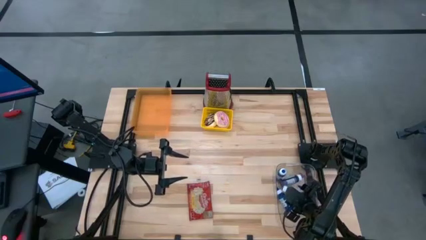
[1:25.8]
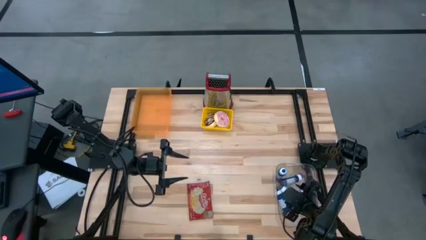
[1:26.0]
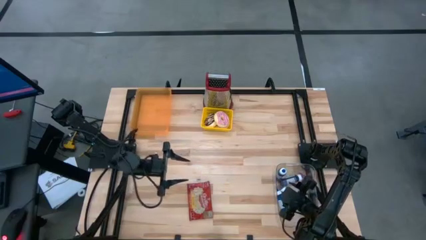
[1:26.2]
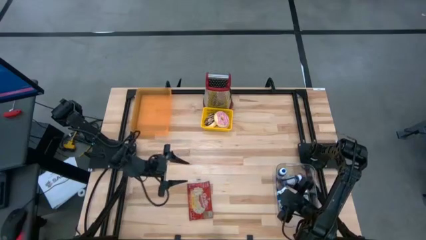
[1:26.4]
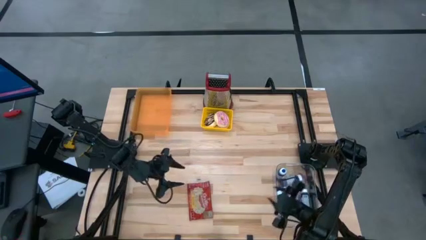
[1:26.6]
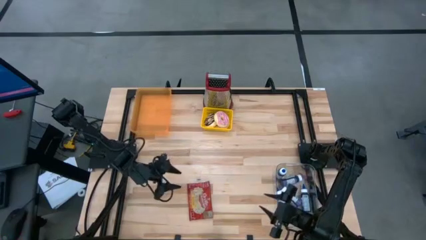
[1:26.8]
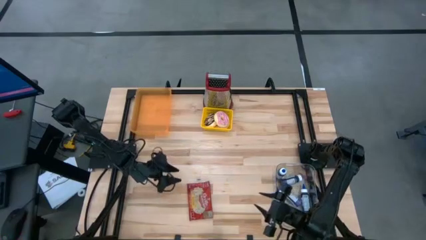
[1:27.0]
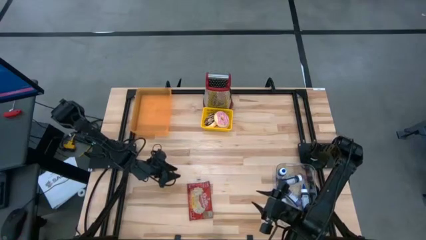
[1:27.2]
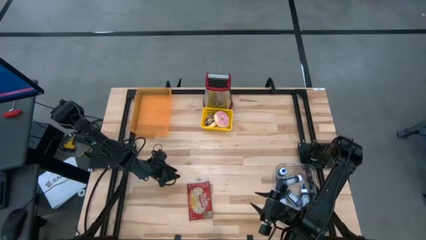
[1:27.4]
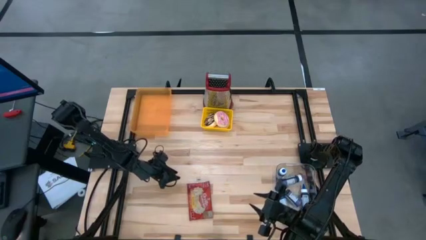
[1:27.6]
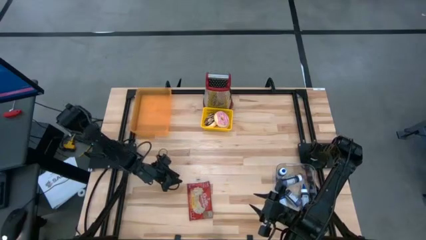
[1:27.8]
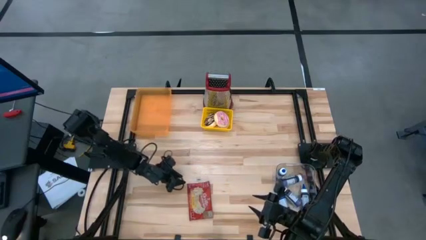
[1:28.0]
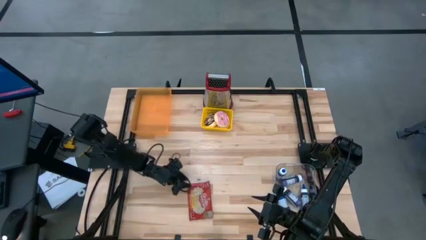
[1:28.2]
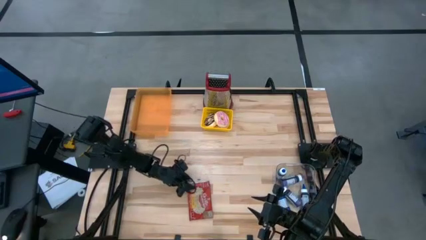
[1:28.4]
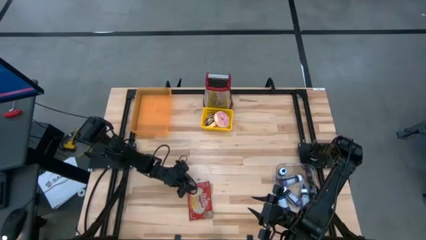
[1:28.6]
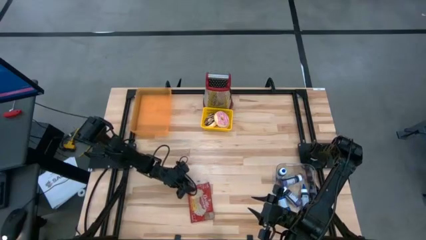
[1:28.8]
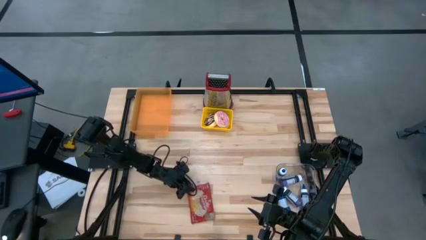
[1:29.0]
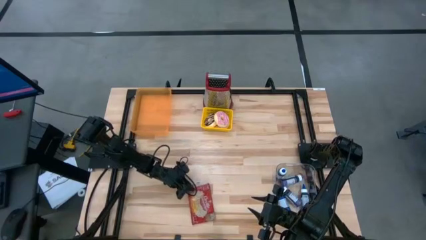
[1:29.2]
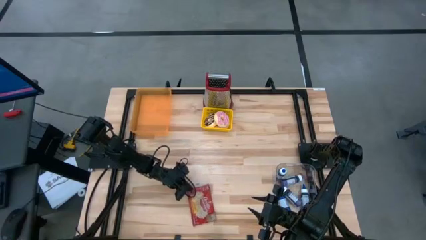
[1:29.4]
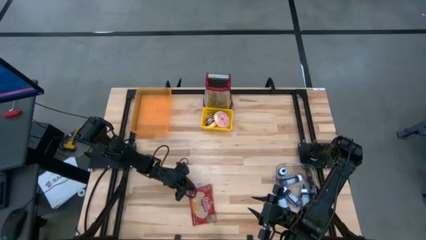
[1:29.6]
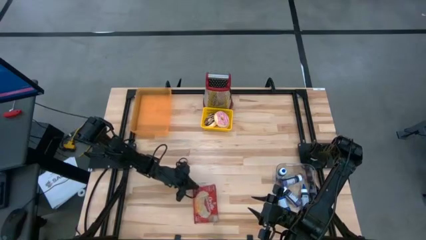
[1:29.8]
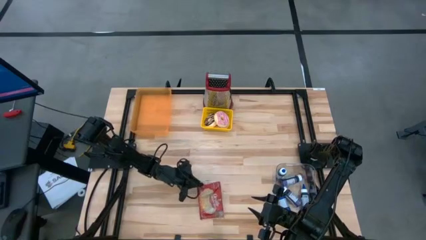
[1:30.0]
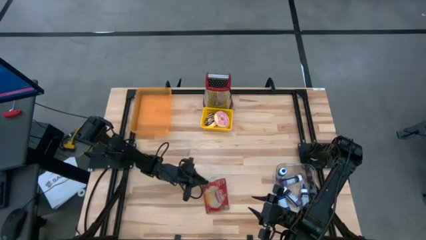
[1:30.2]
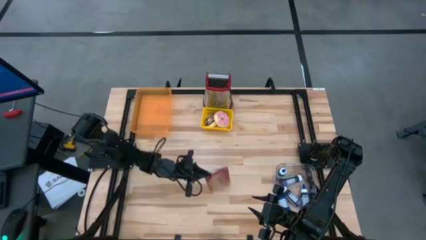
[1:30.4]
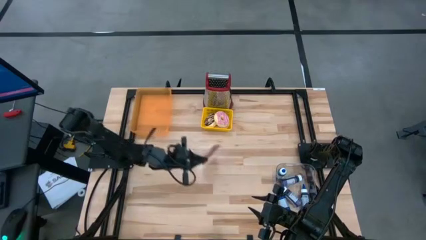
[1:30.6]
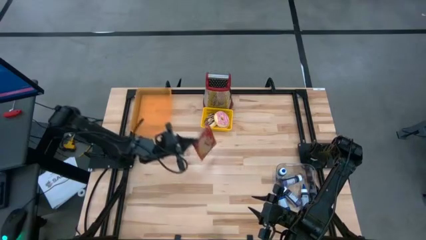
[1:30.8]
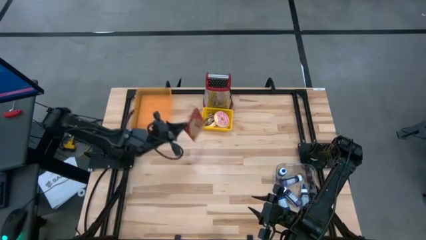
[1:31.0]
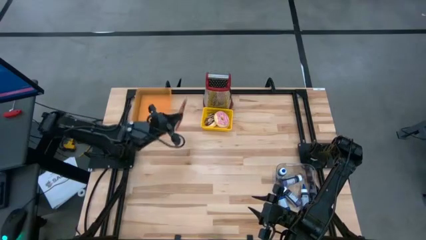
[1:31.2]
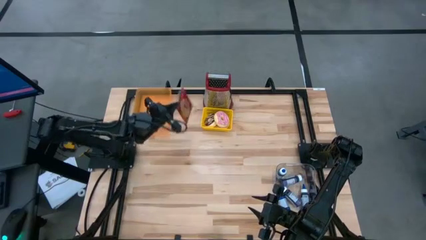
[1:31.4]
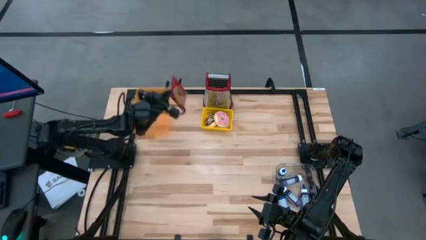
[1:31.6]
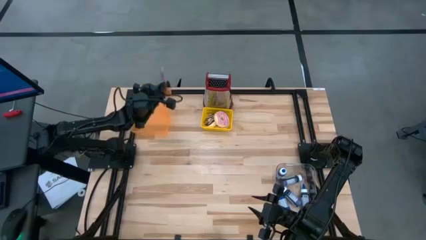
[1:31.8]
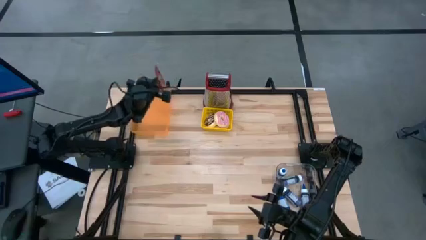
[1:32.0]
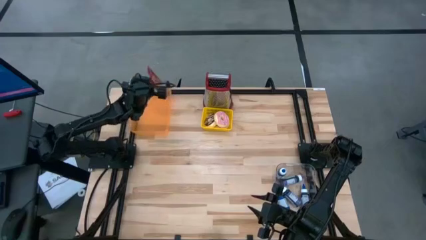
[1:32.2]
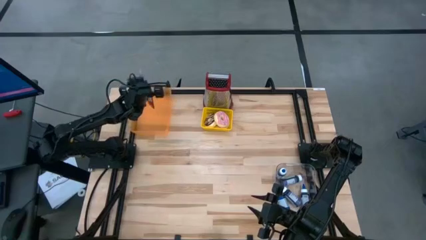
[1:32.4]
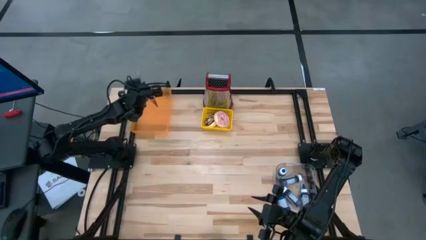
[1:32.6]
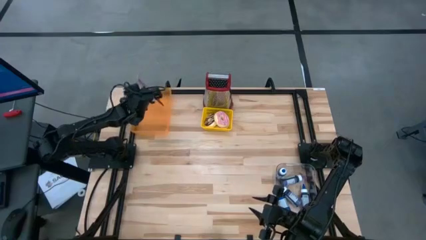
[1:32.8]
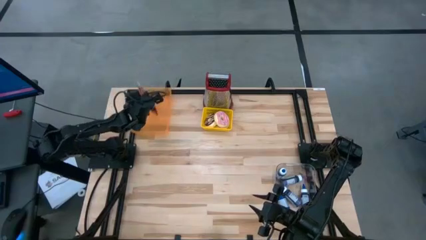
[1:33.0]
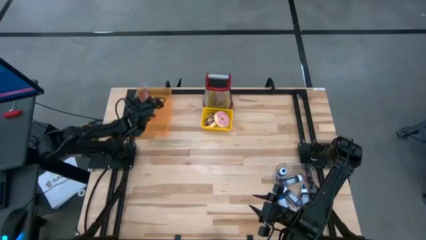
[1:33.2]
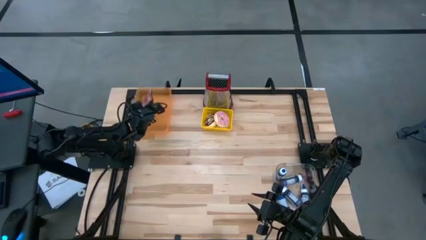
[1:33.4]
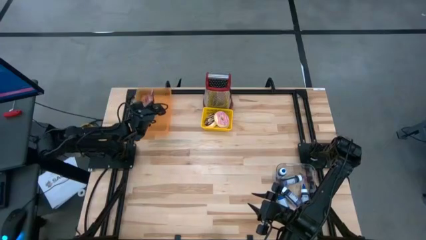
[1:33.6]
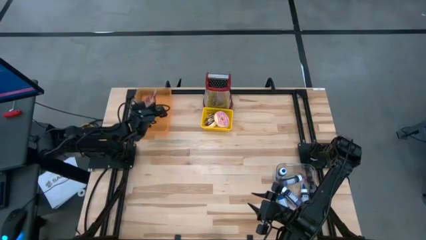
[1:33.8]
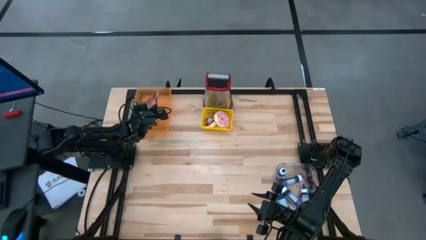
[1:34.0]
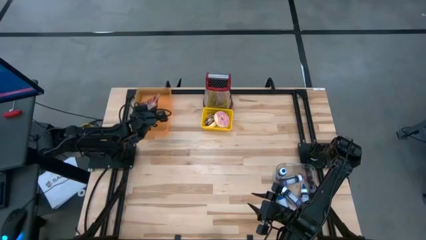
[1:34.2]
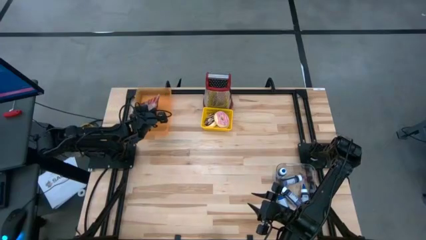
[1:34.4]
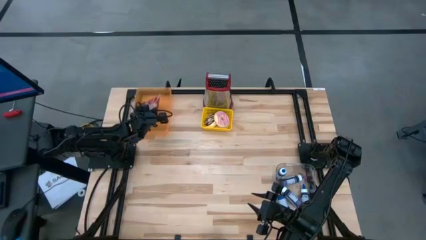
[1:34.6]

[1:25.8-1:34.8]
Put the popcorn bag into the orange bin

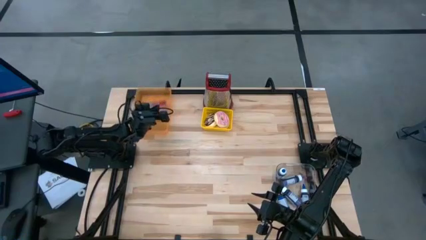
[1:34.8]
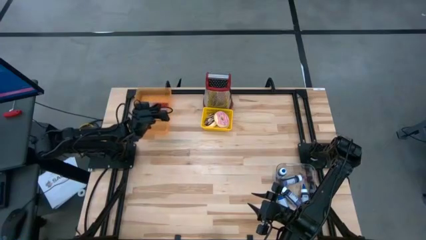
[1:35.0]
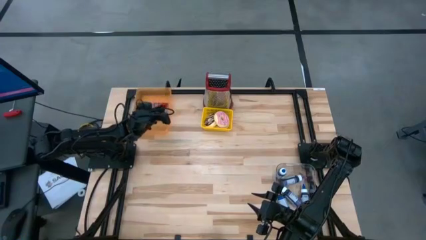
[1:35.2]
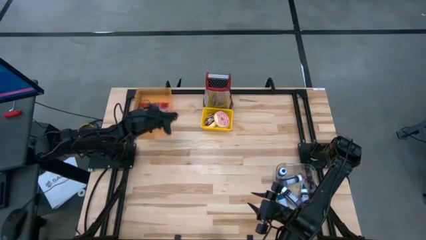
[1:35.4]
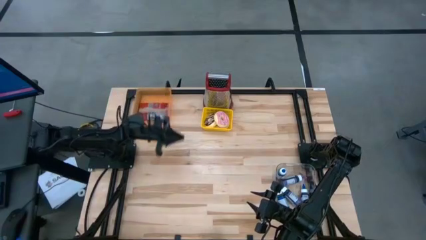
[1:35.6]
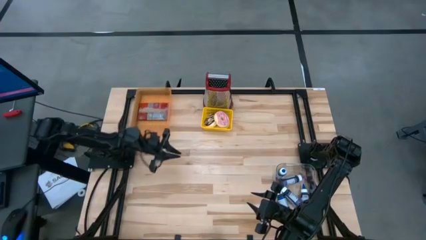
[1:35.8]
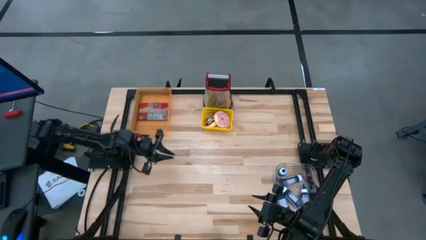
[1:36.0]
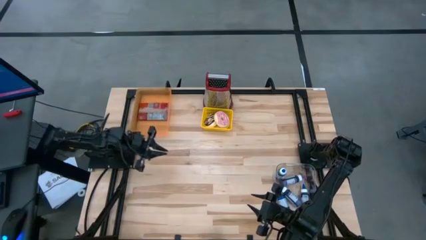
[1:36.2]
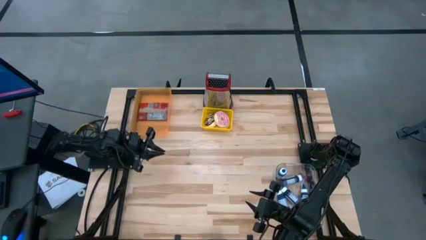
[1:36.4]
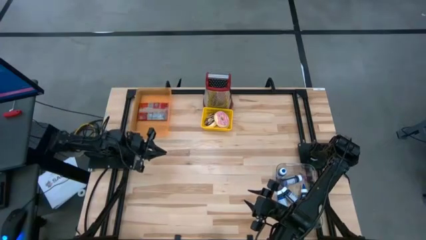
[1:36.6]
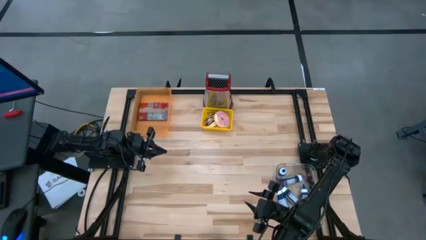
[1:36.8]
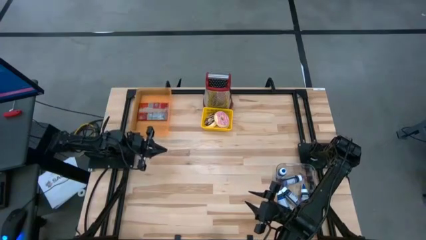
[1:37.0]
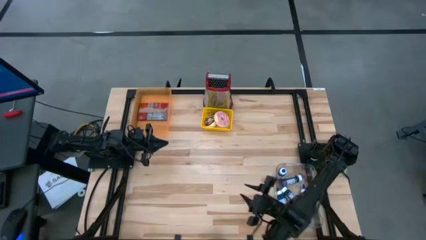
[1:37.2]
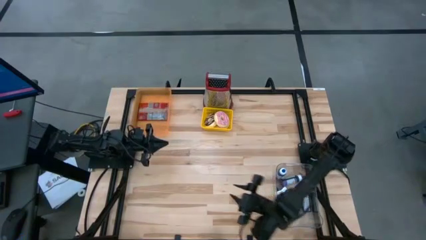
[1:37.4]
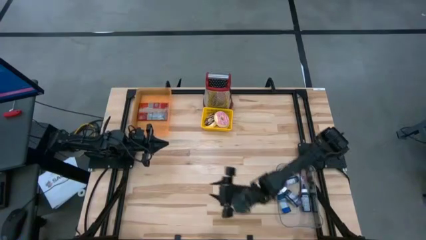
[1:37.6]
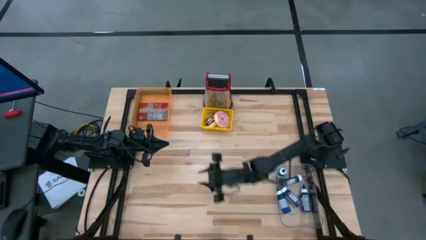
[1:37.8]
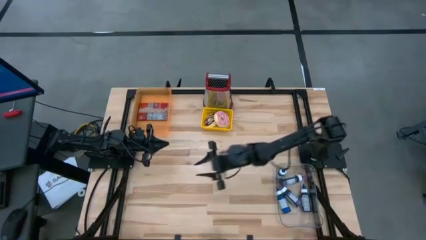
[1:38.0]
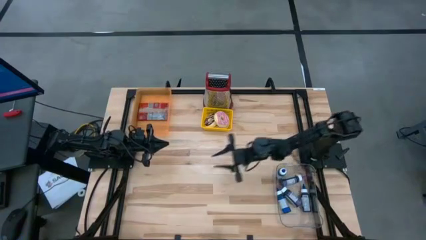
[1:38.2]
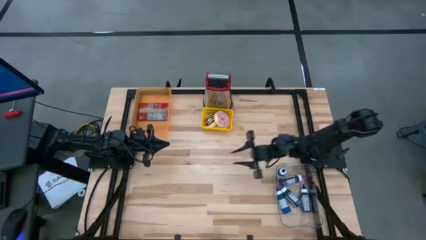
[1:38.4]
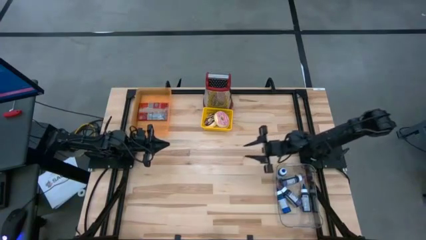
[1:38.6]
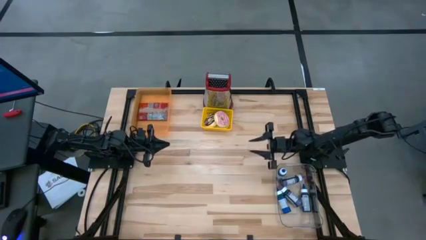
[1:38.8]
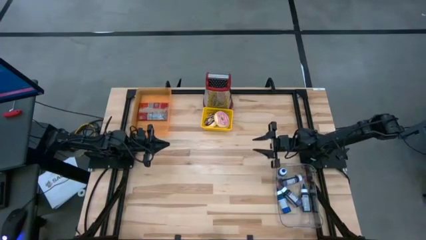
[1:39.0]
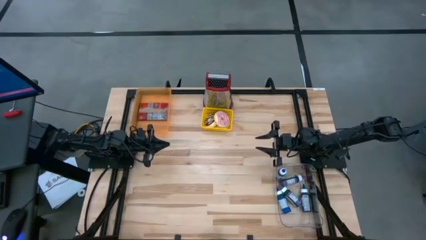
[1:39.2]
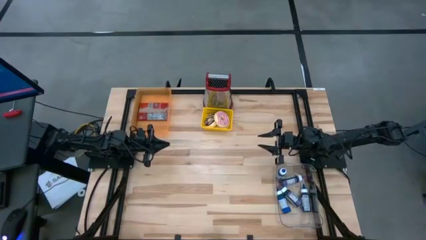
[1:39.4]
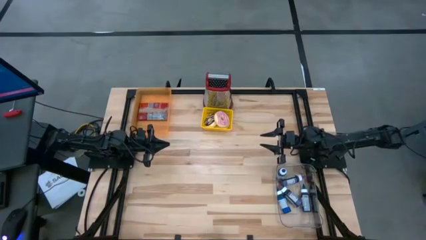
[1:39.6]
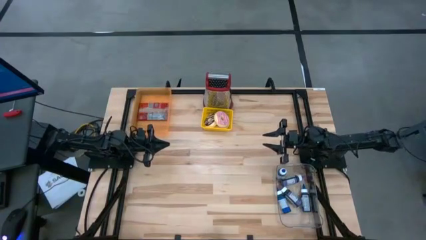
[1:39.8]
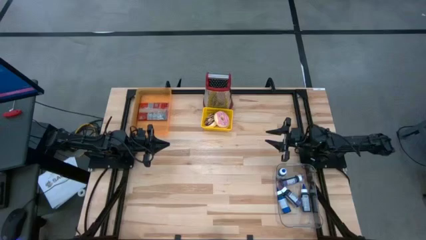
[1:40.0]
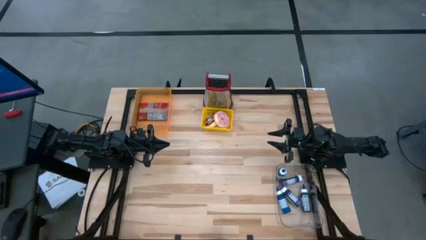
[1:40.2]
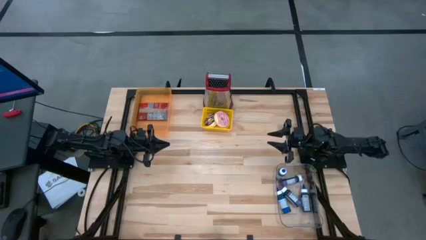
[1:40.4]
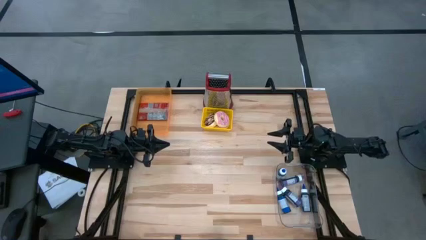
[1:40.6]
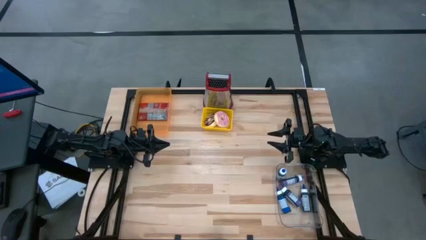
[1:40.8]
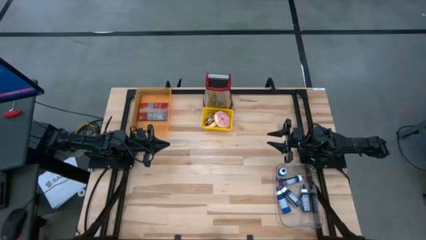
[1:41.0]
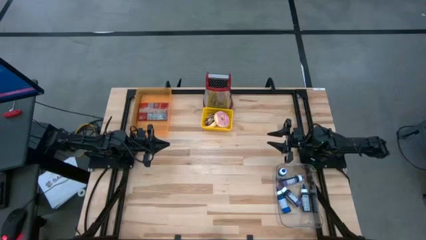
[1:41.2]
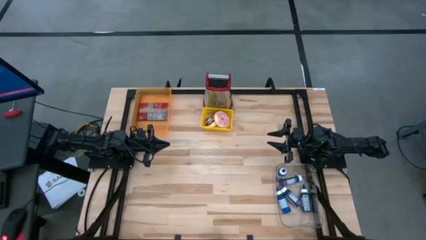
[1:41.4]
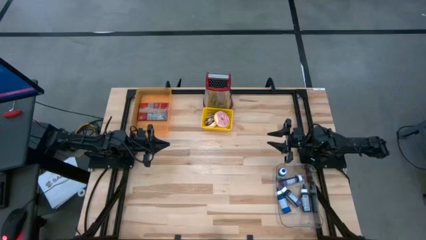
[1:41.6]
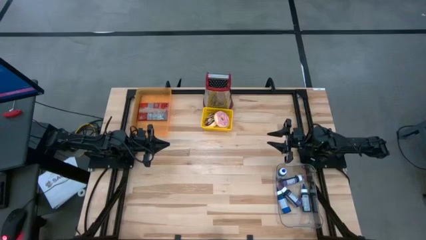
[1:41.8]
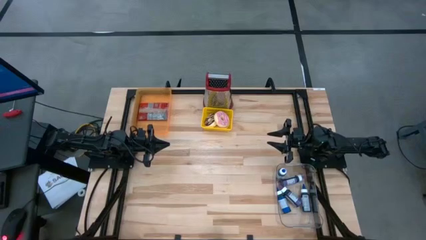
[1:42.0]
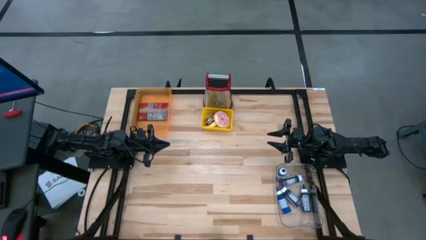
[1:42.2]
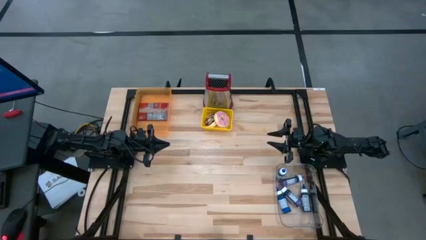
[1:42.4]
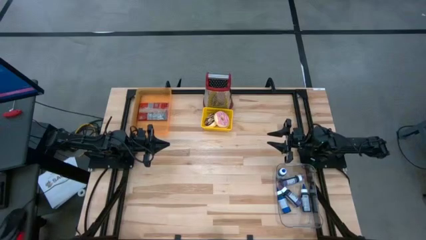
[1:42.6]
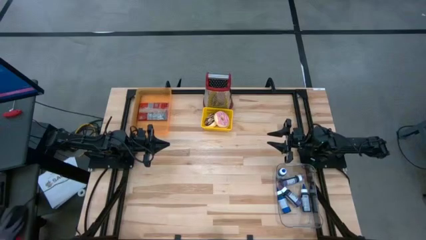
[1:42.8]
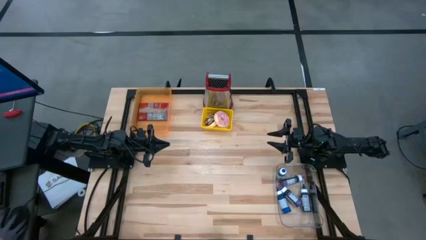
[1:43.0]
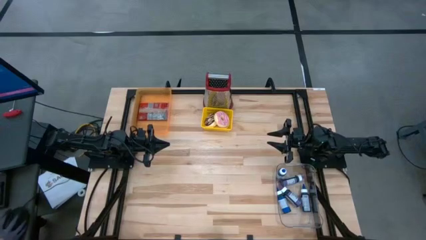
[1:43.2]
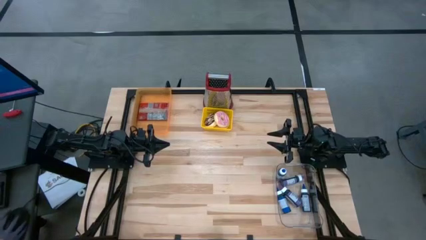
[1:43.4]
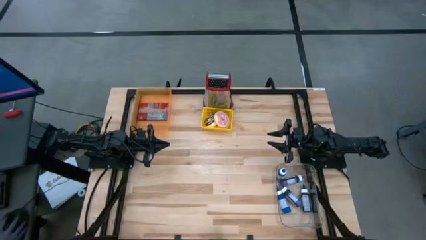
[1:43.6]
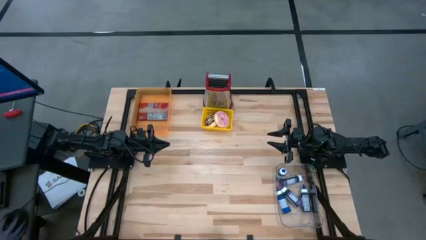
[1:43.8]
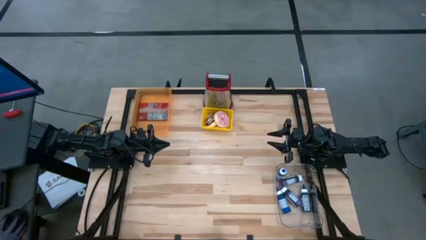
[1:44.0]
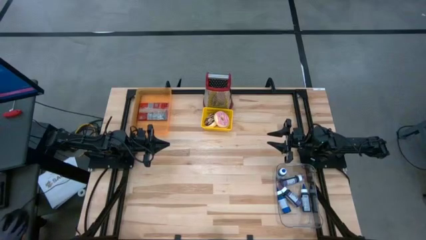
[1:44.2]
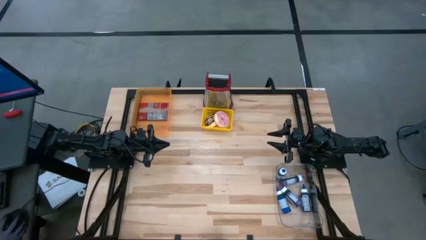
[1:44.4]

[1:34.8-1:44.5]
Return to Home Position
